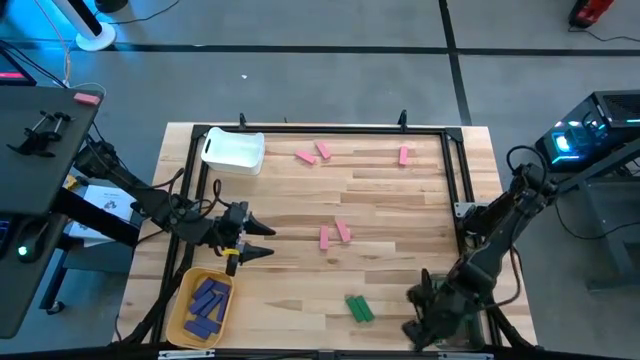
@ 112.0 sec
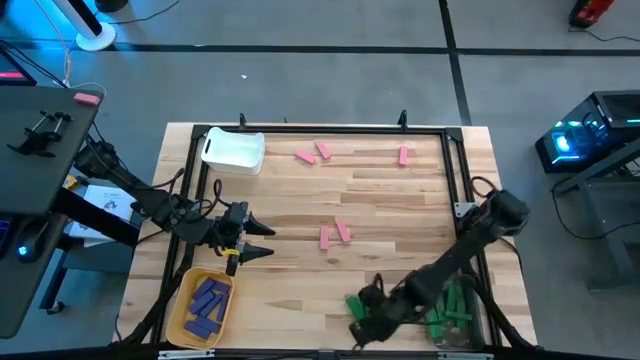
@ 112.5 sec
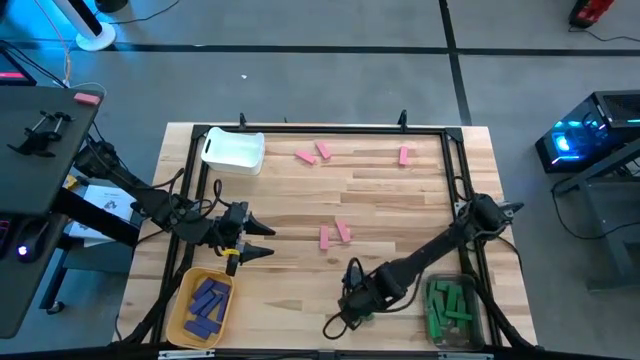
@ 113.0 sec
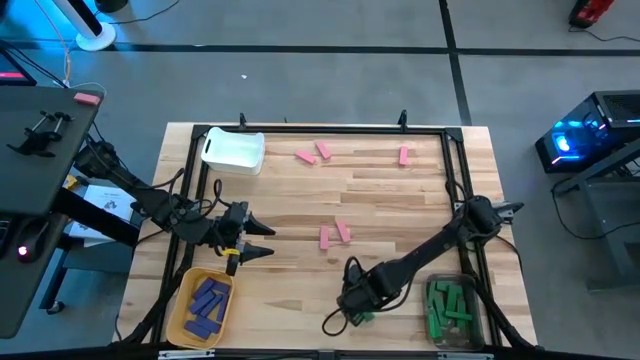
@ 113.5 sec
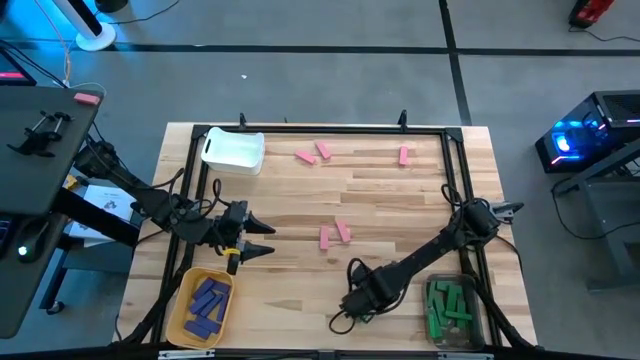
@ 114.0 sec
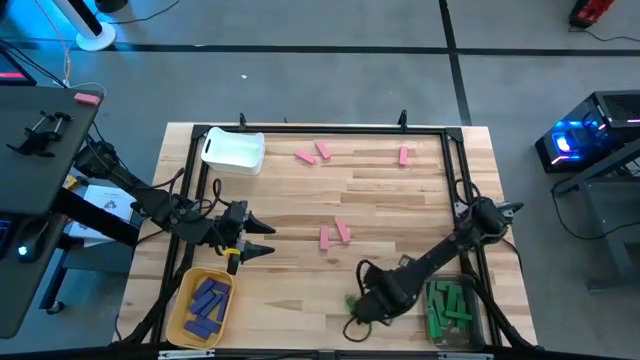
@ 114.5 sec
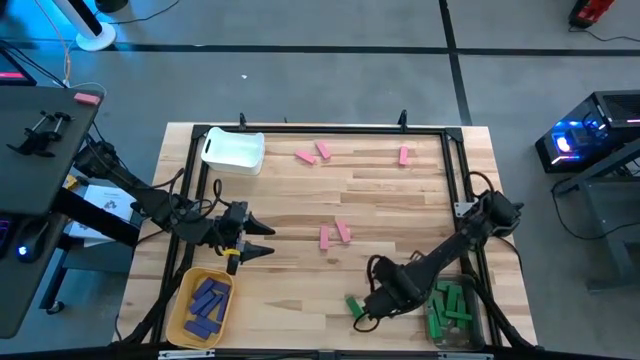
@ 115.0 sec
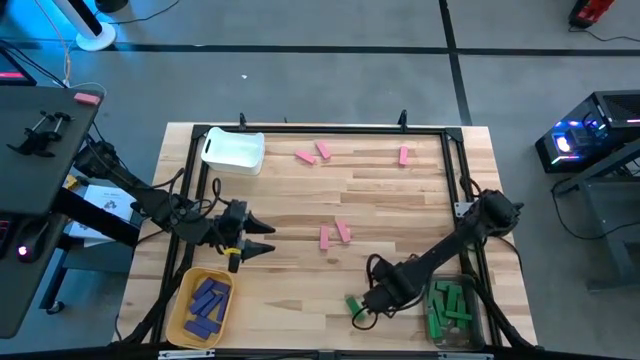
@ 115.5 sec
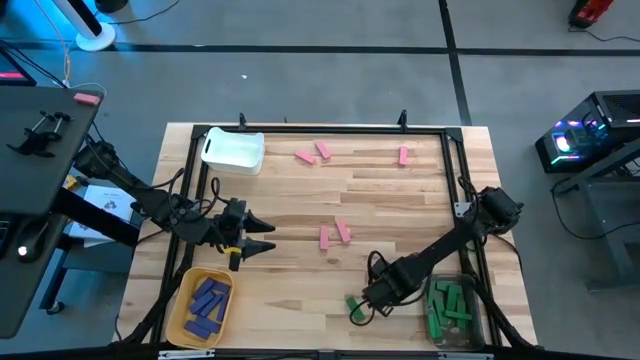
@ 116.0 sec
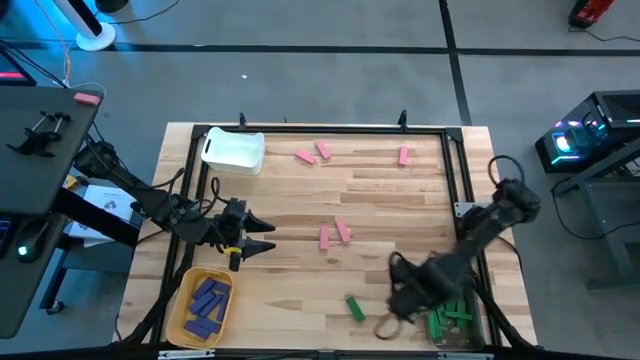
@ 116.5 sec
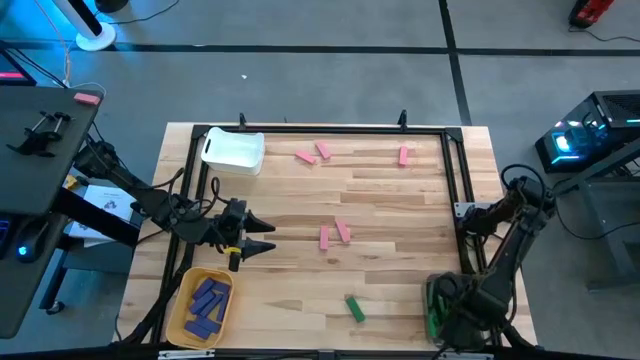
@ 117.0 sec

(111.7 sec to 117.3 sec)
Task: Sort blocks
Put the green block into the black bin

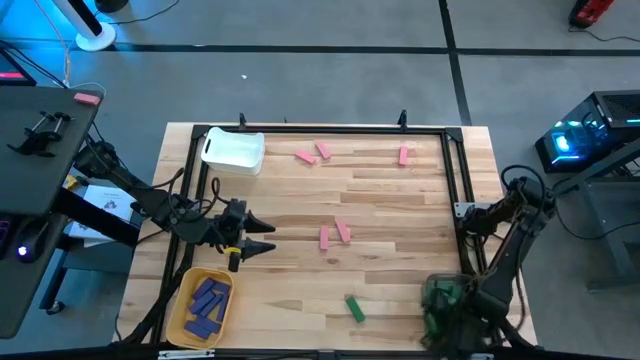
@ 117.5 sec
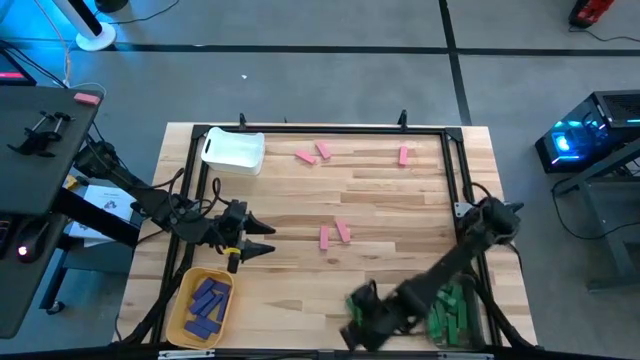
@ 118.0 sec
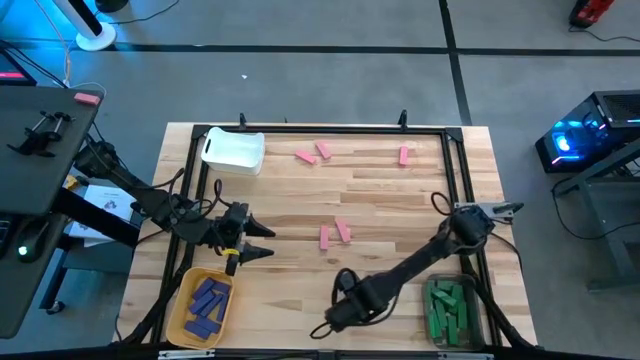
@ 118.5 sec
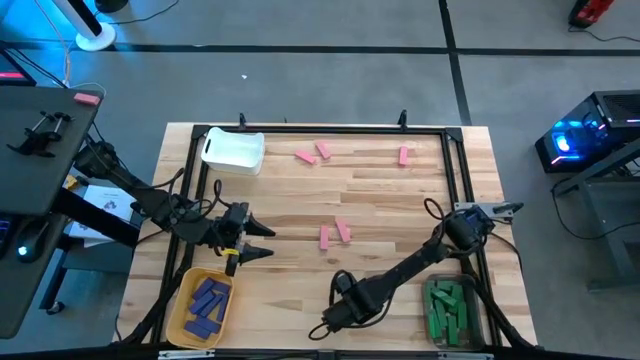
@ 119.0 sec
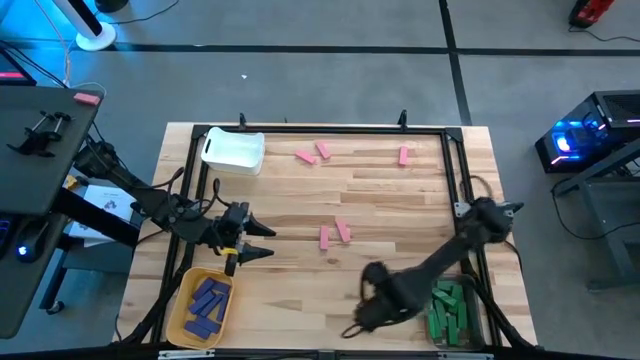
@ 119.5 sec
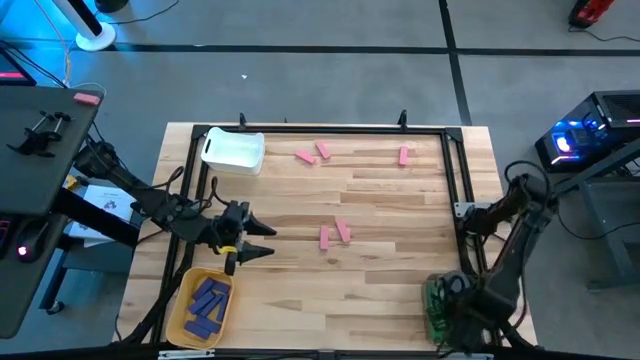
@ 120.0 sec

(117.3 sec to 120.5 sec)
Put the green block into the black bin

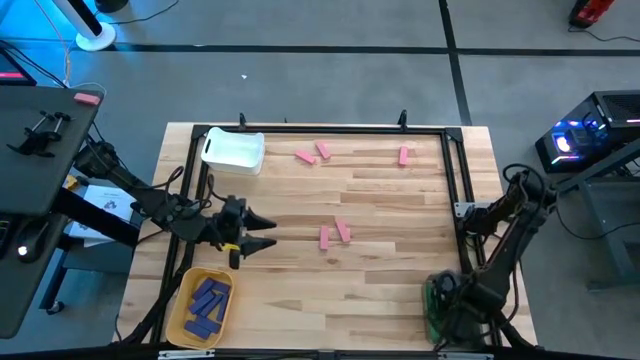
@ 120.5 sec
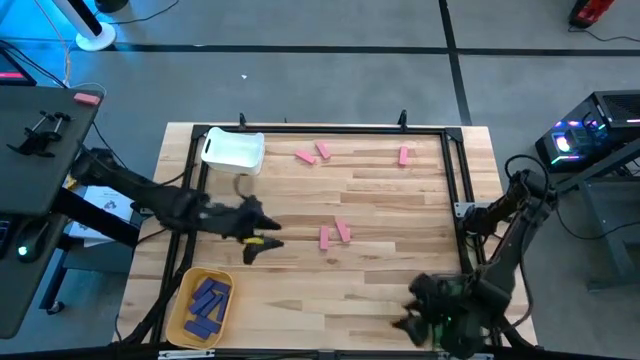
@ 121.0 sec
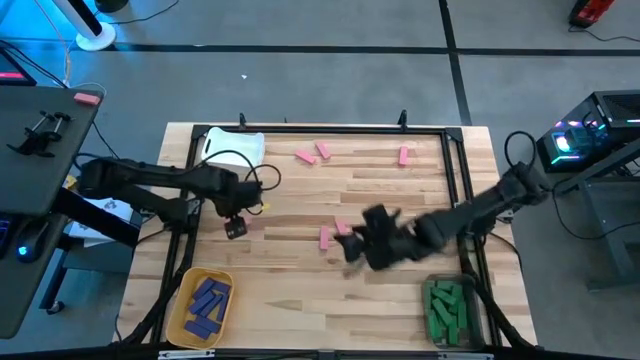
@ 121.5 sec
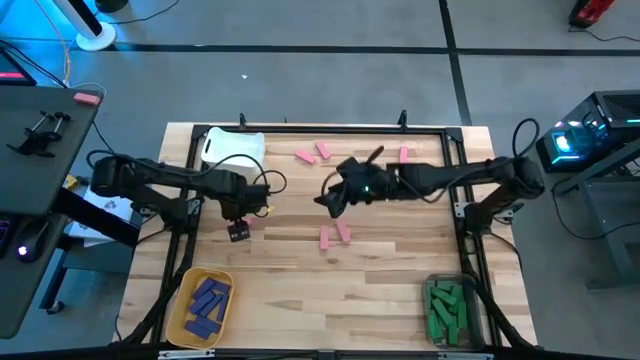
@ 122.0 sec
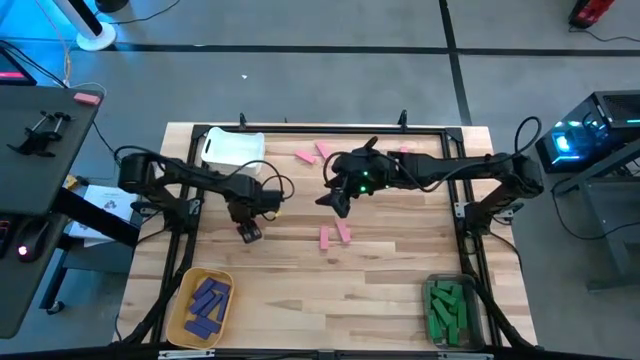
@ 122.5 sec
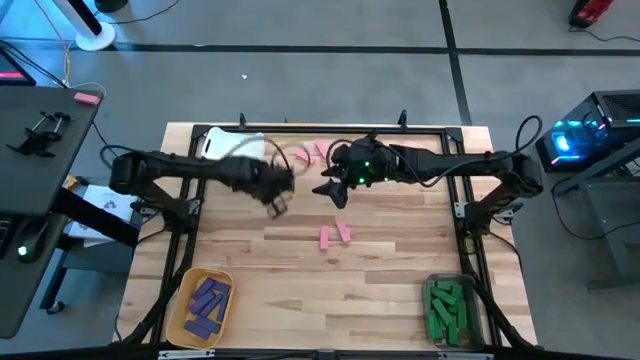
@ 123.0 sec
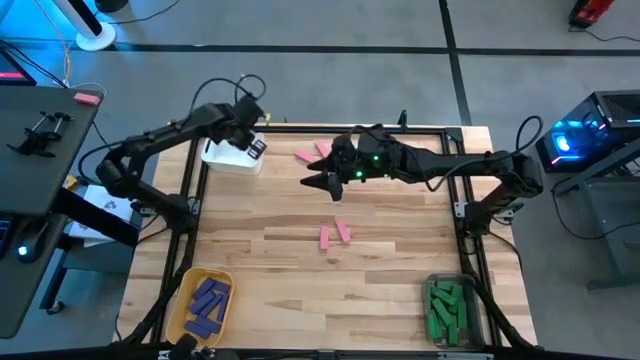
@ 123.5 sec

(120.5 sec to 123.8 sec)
Put the pink block into the white bin

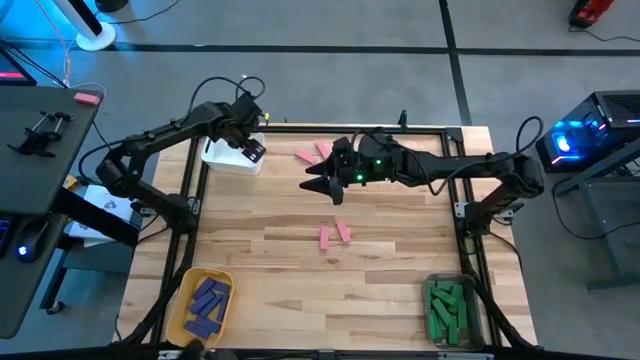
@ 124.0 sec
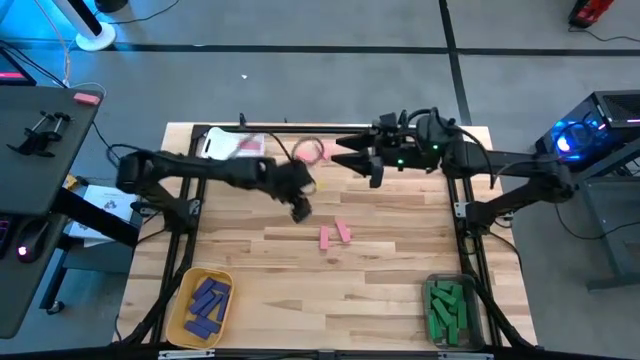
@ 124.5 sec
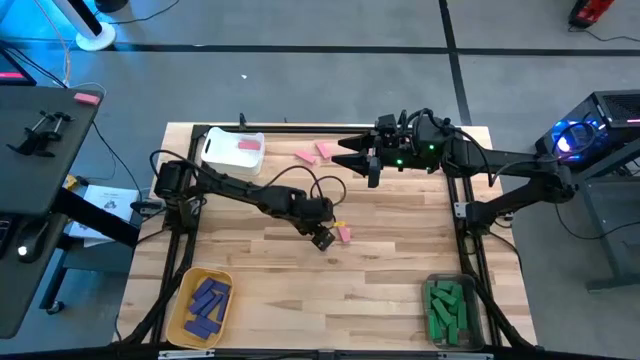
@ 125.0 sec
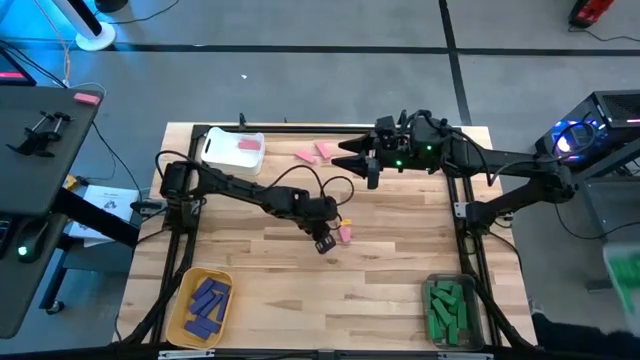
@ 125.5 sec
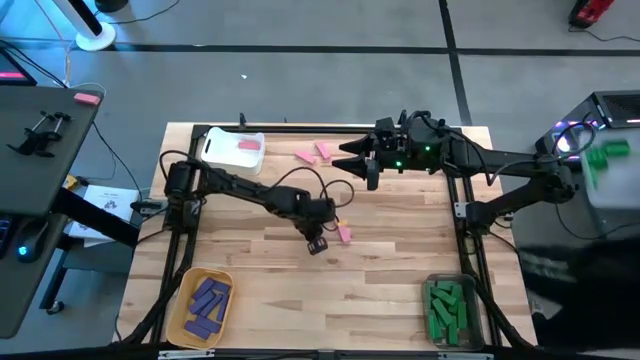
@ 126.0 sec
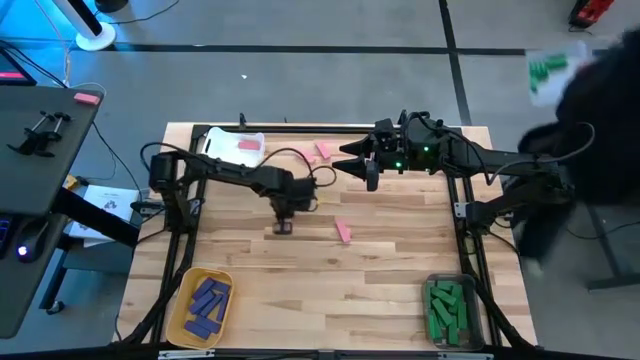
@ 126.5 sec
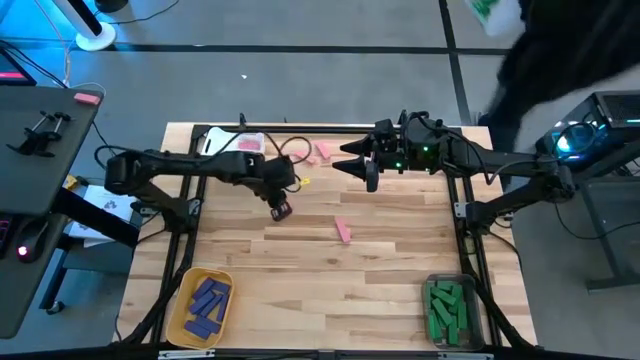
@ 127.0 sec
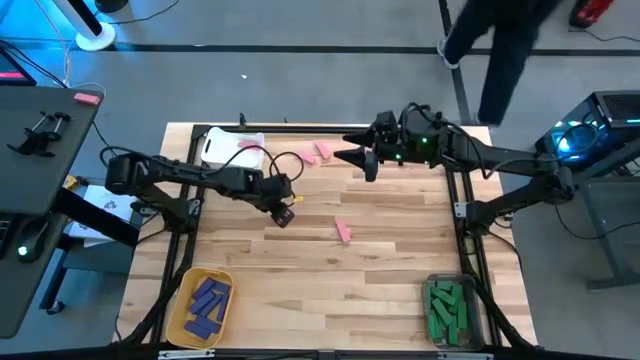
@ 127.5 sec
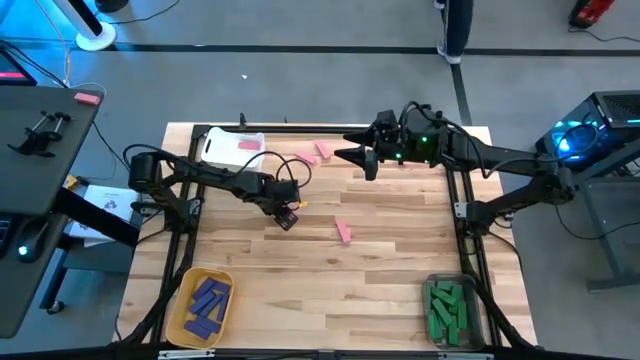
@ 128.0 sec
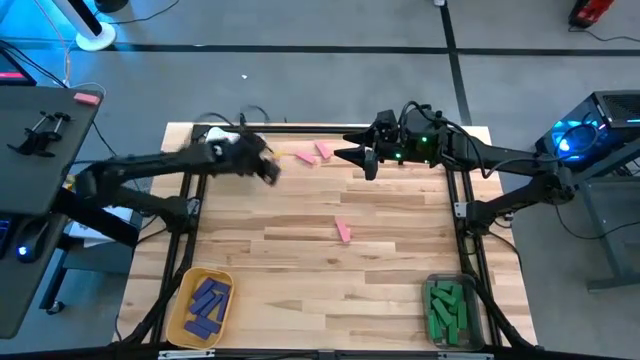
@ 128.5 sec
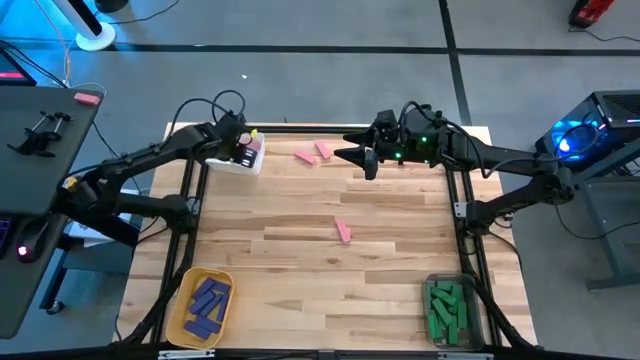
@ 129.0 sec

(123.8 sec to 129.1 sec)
Put the pink block into the white bin

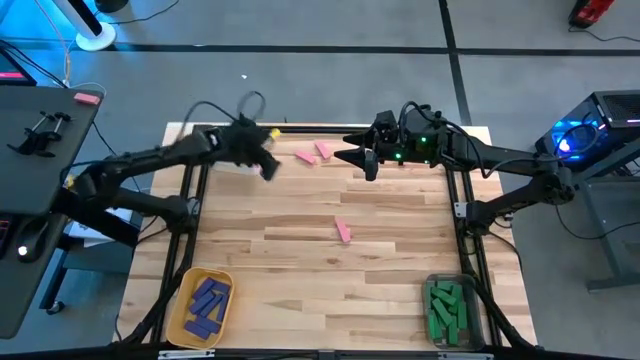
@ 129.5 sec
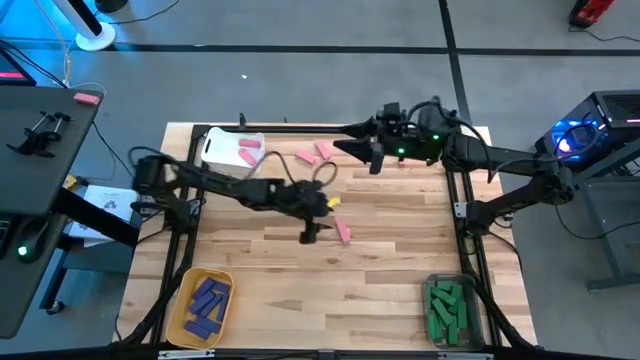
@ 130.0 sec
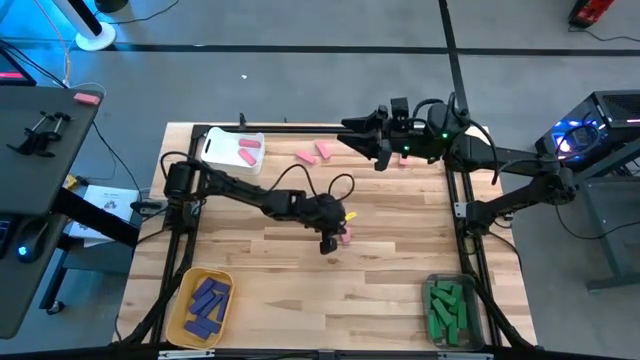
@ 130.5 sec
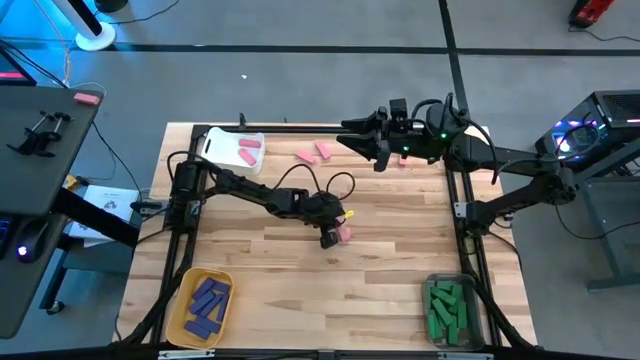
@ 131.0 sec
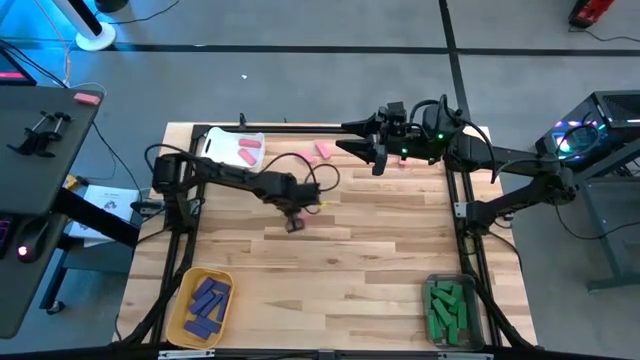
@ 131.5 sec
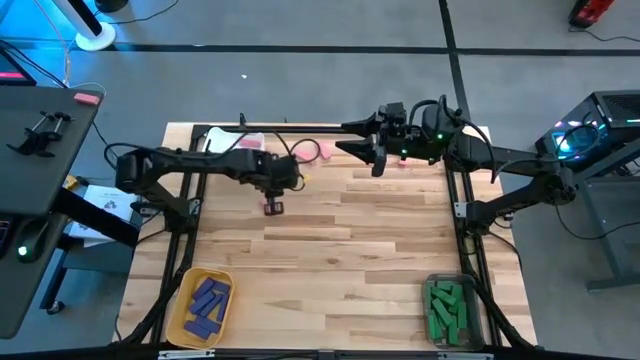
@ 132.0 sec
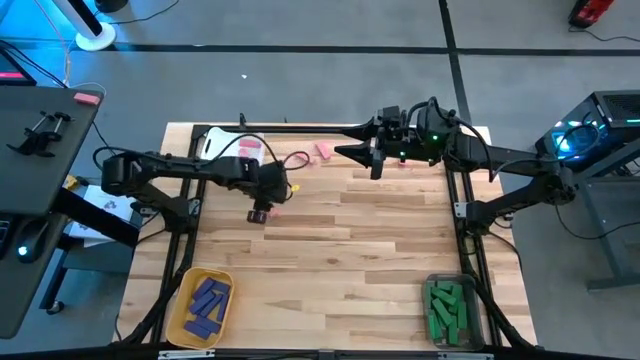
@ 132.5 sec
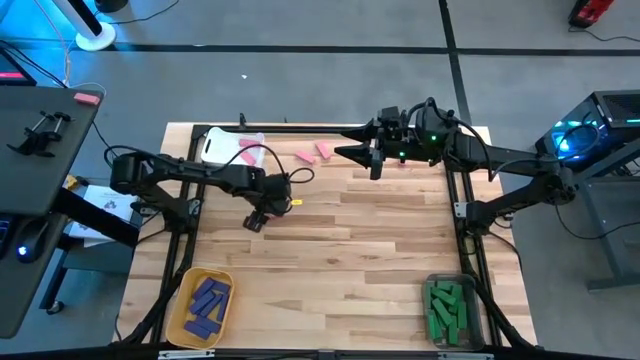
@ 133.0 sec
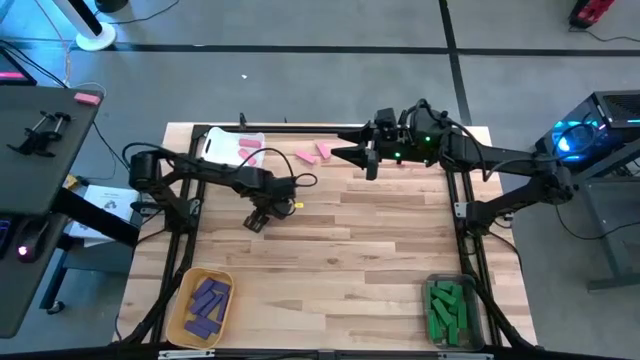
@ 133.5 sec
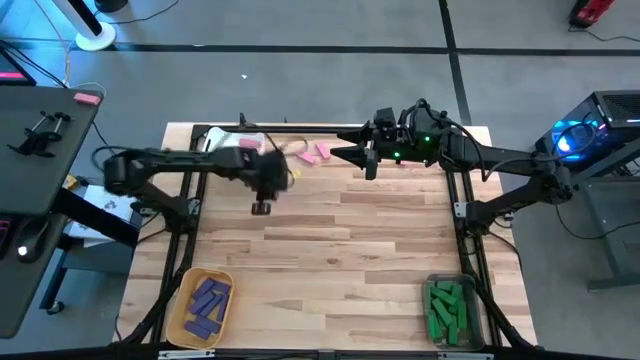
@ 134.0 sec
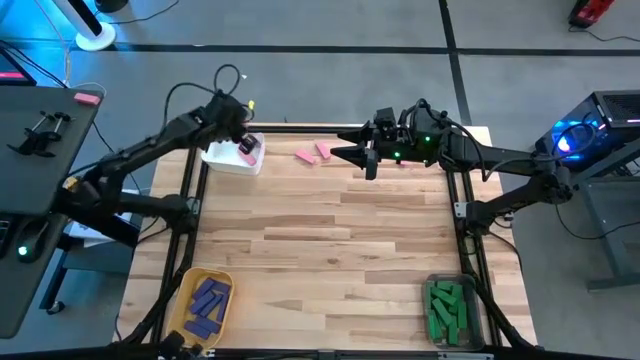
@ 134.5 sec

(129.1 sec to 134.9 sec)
Put the pink block into the white bin
